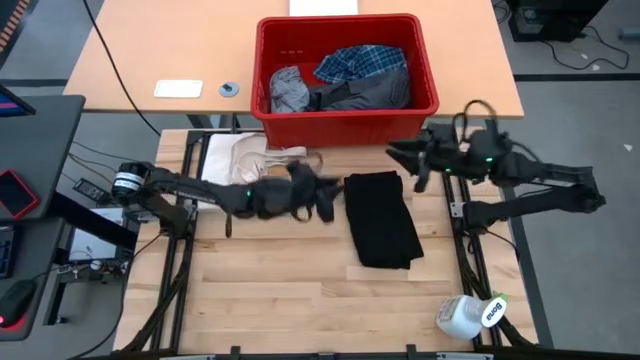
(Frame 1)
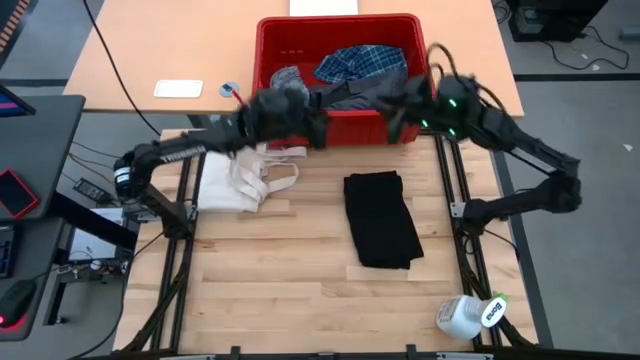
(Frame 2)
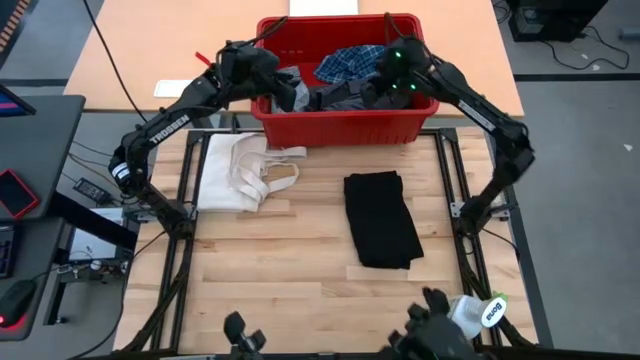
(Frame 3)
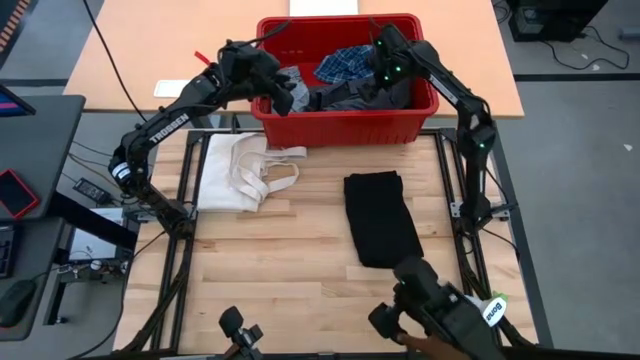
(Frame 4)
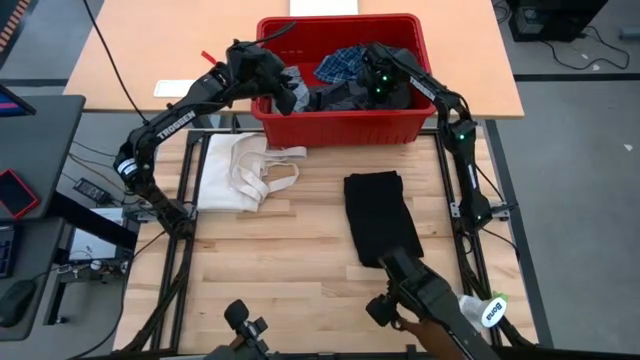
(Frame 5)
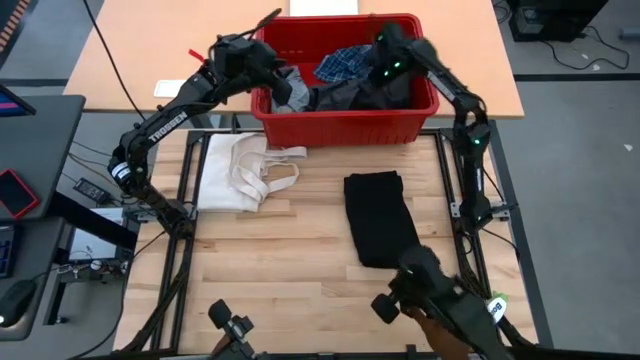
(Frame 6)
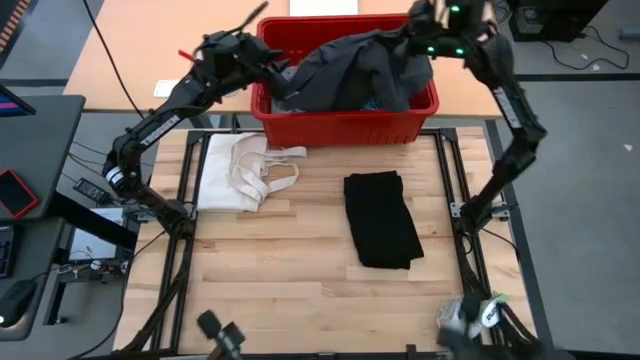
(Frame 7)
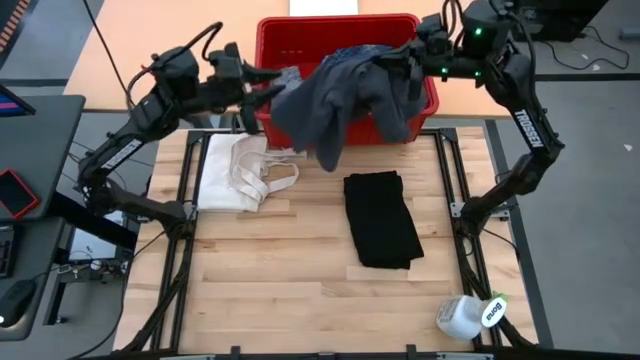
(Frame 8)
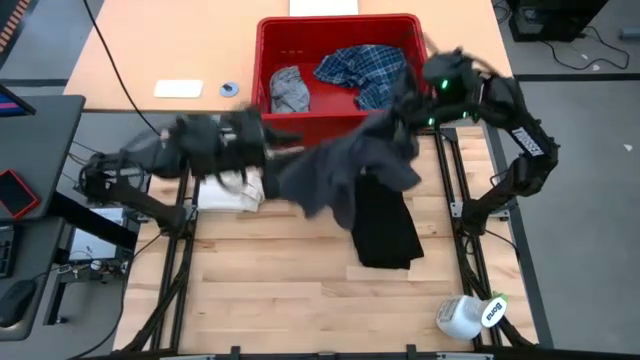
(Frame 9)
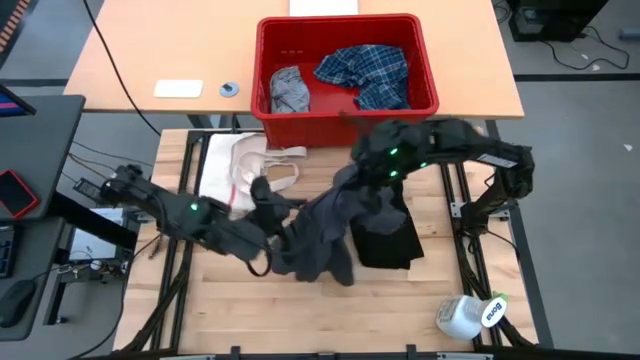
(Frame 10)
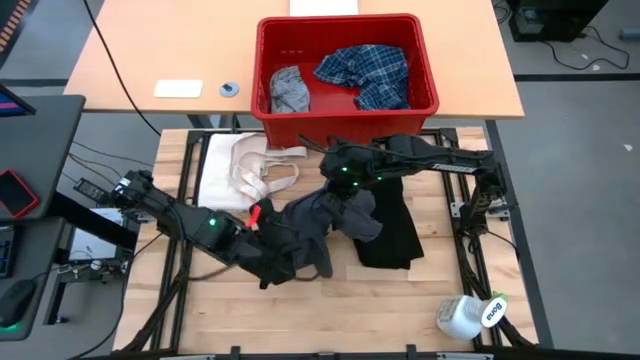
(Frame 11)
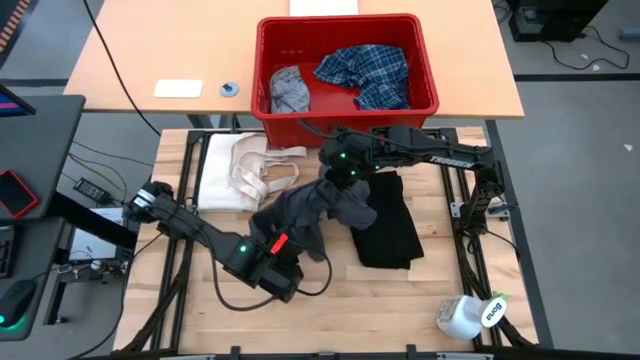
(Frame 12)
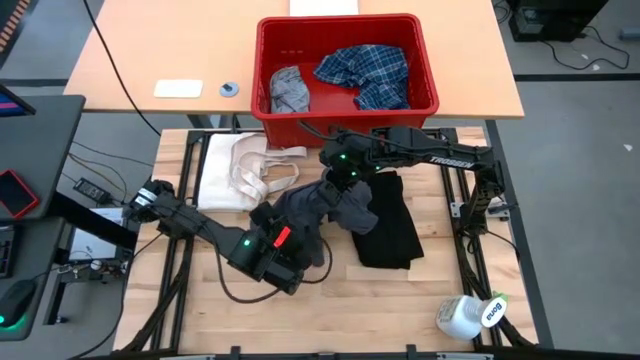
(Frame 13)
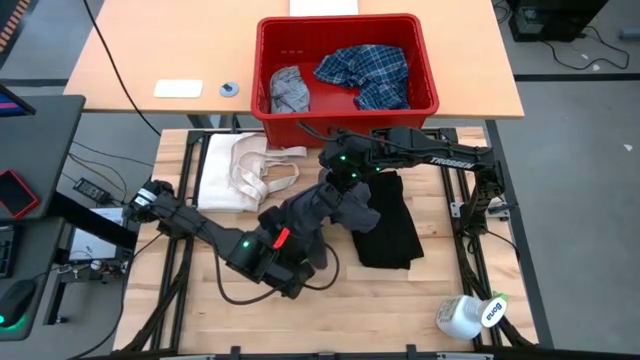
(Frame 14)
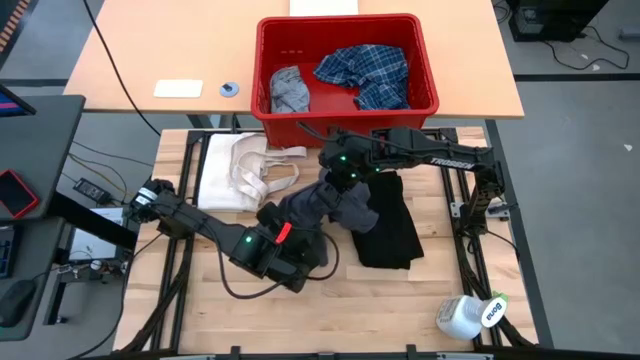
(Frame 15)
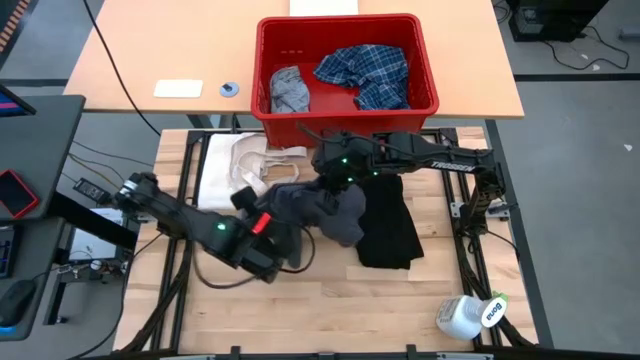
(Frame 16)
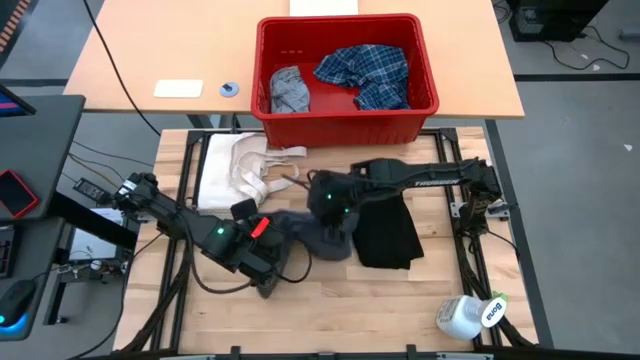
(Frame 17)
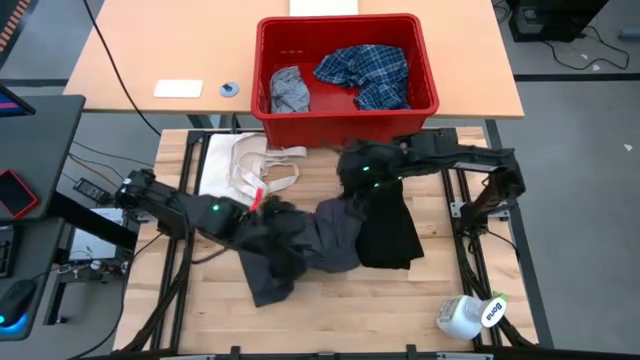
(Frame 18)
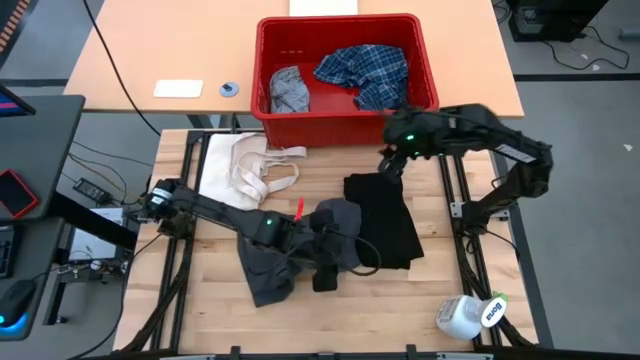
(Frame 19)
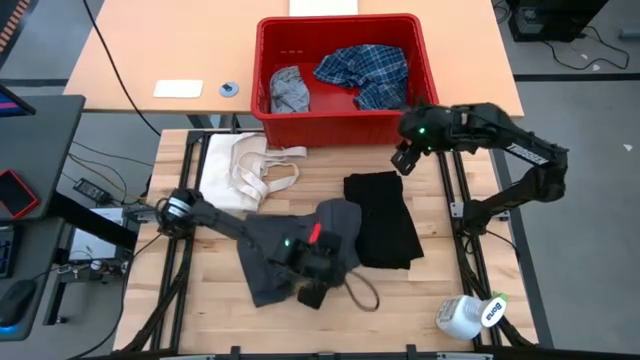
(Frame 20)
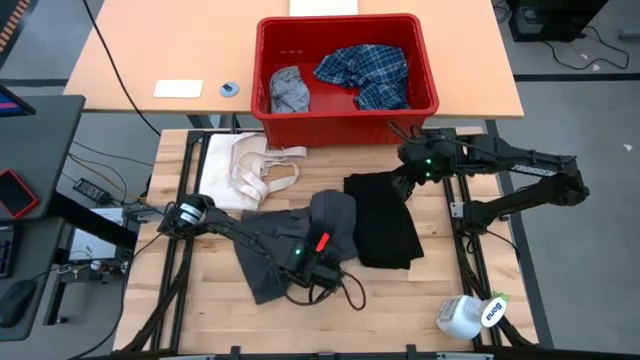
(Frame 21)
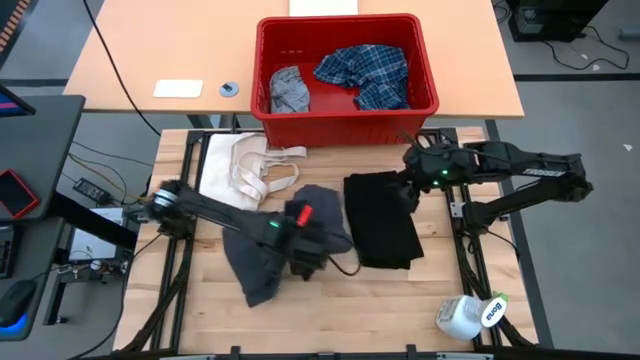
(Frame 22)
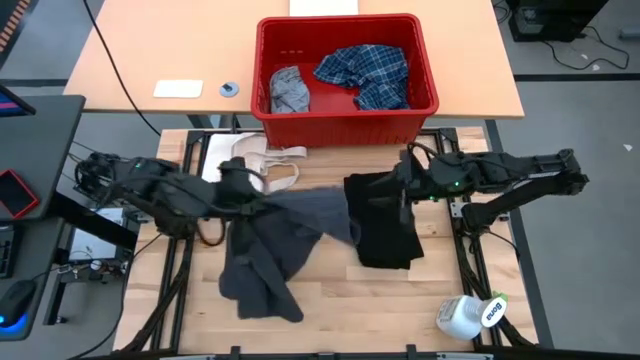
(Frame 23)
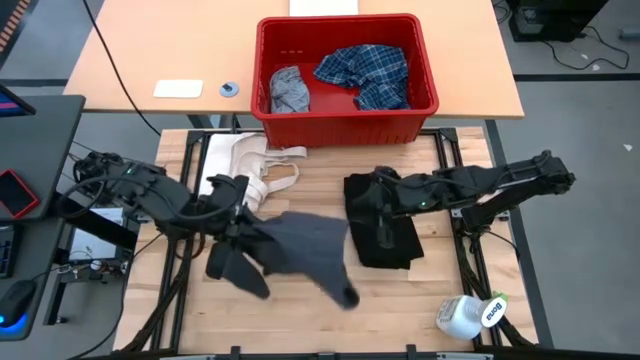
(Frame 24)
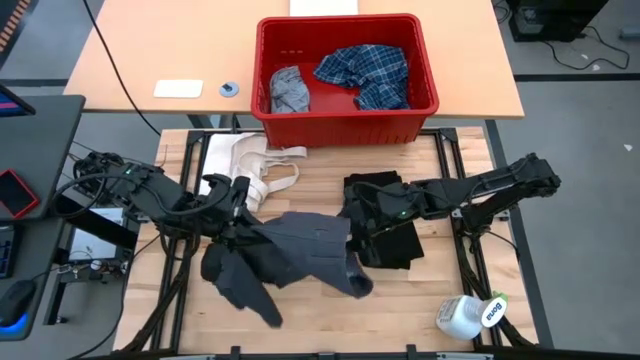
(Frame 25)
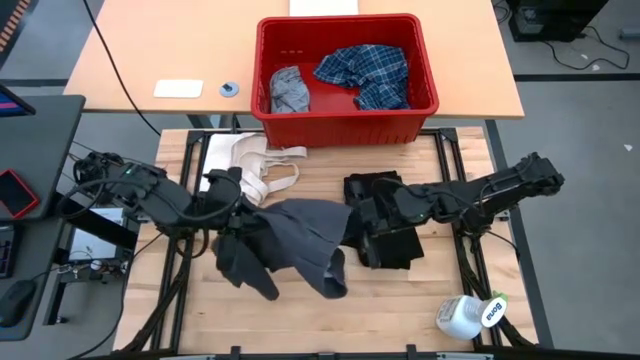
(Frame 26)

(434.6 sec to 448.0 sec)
Task: Fold Laundry from Bin
Fold the gray pants

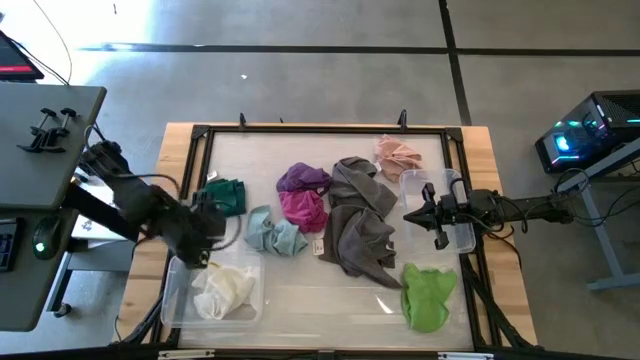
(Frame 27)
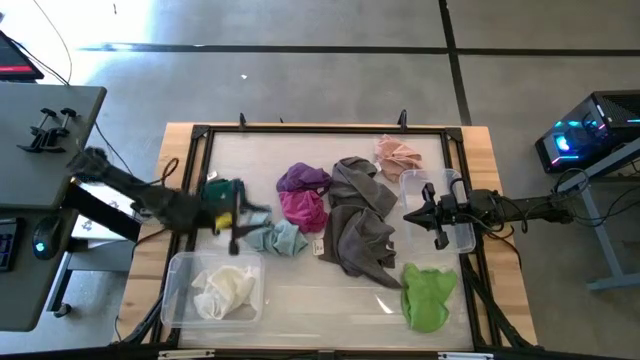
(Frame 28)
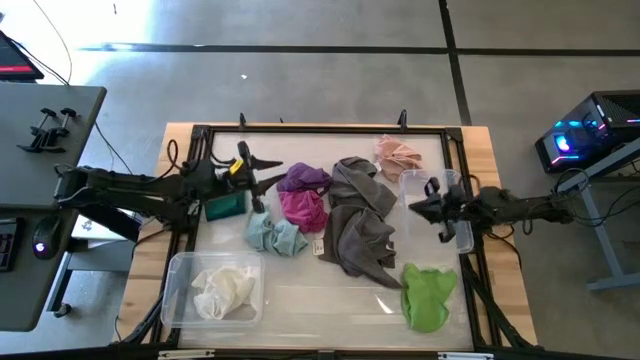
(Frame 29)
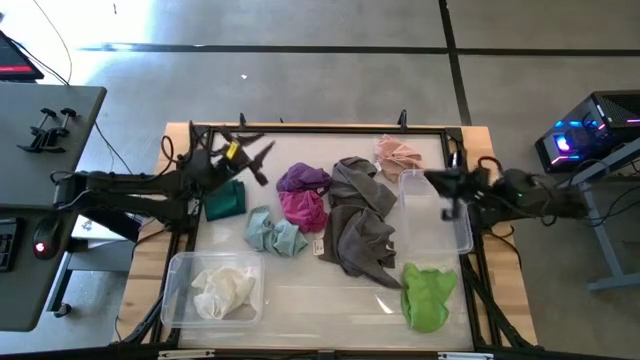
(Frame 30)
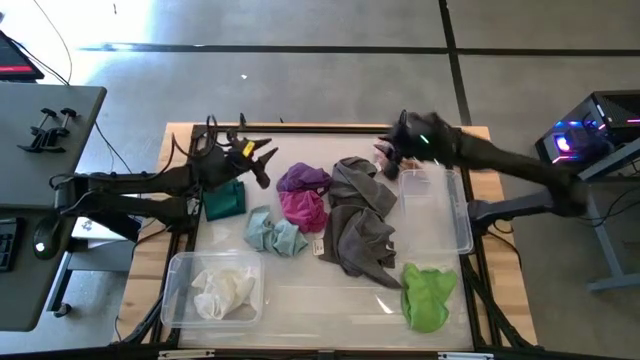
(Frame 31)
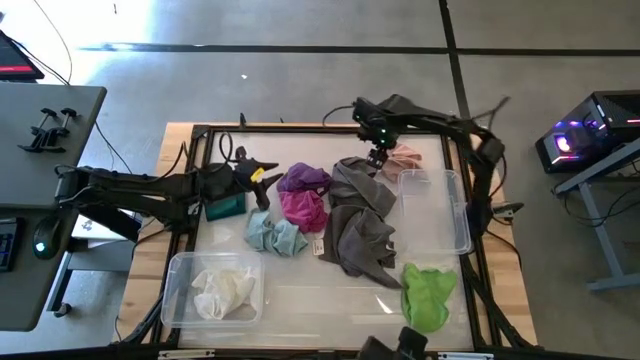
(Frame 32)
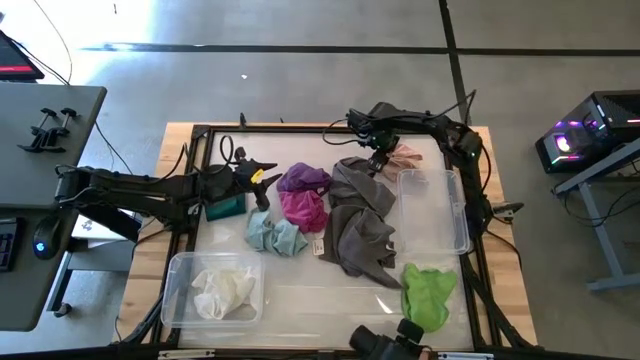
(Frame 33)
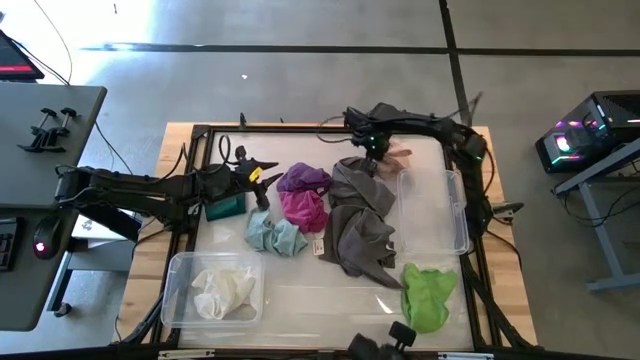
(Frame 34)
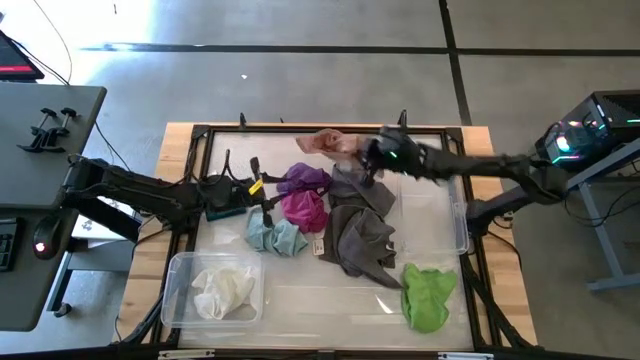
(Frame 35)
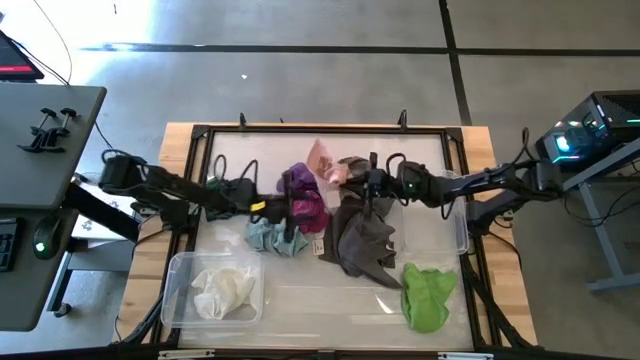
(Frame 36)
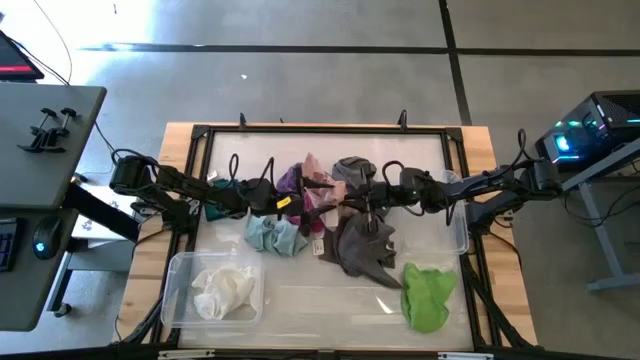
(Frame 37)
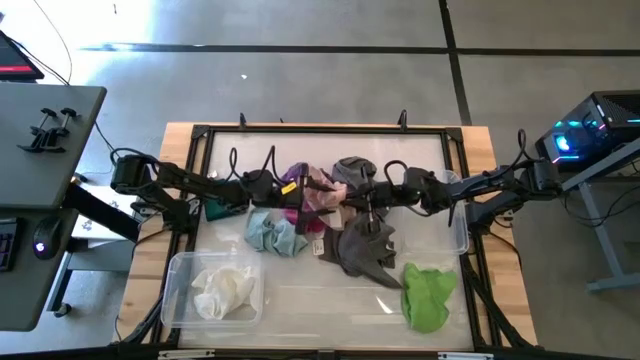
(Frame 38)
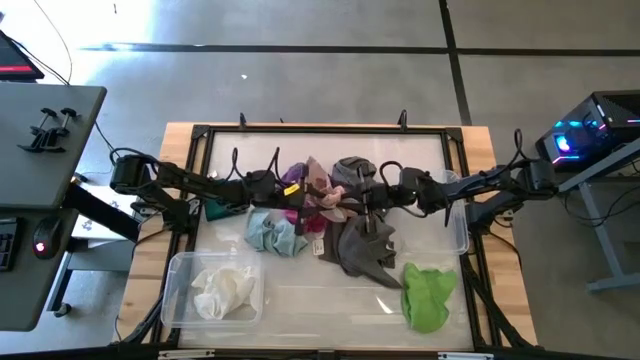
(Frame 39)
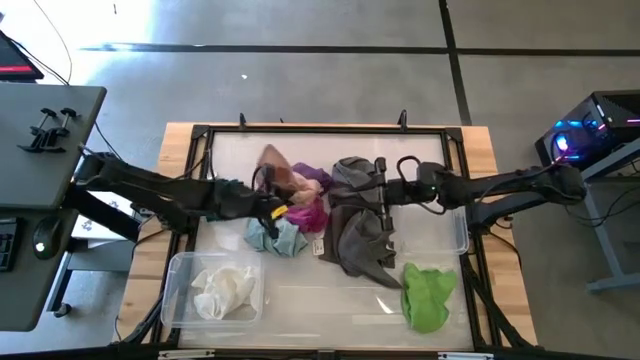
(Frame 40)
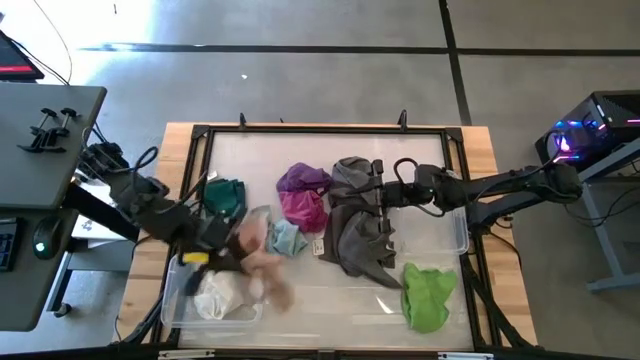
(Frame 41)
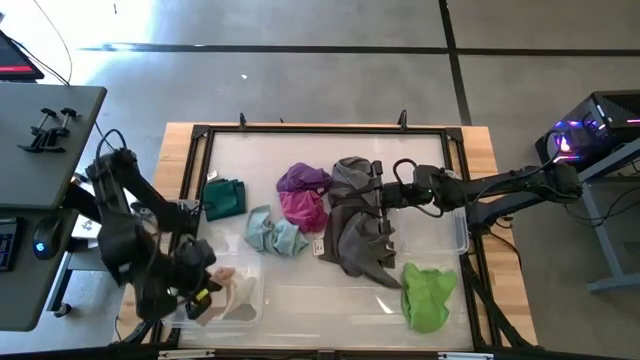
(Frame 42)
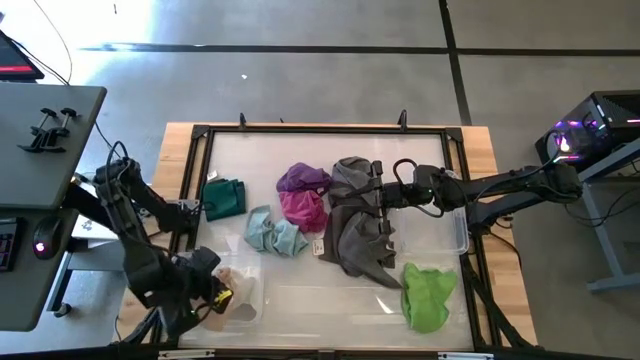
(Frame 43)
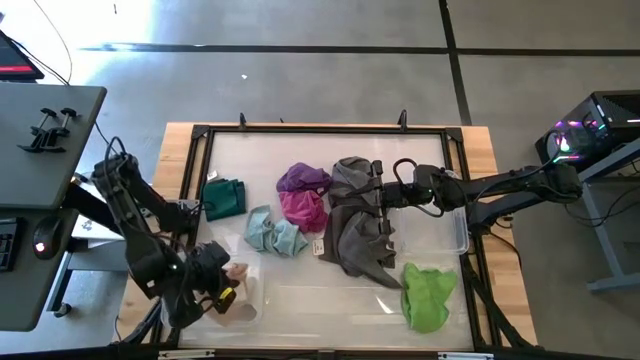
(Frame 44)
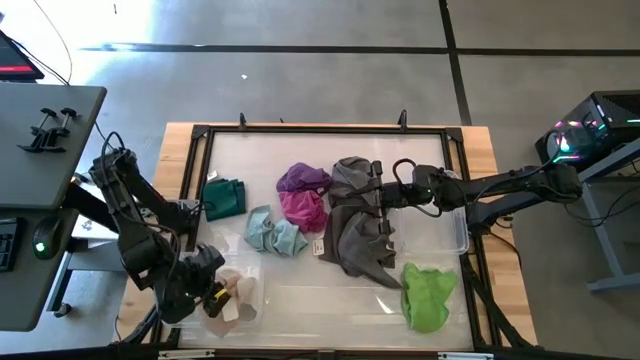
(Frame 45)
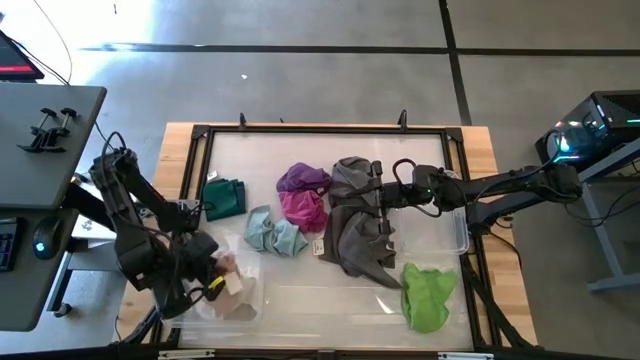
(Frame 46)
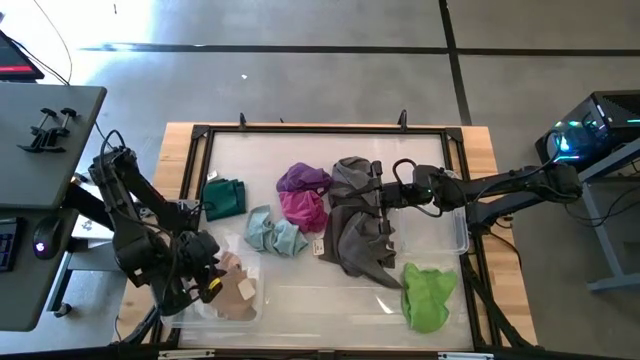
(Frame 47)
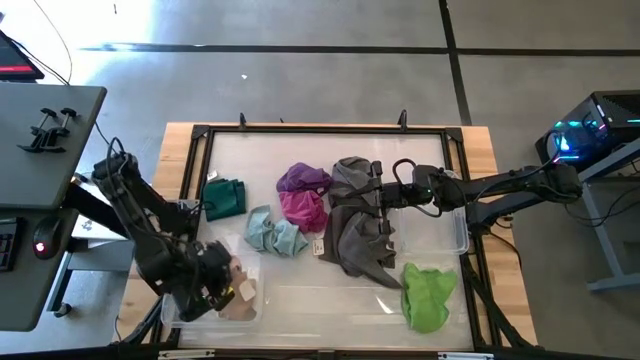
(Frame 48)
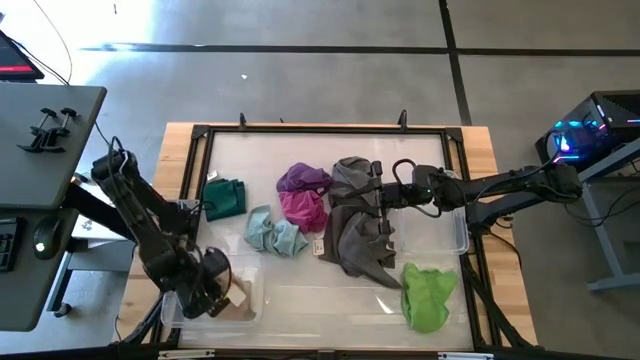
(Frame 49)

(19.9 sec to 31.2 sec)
Task: Sort microfiber towel by color & place in baskets
Put the light orange microfiber towel into the bottom transparent bin
